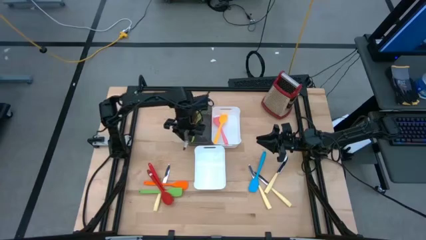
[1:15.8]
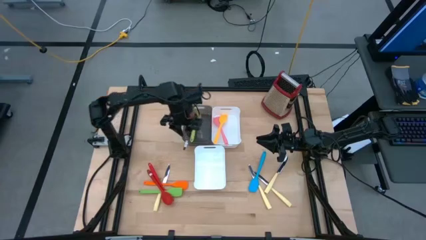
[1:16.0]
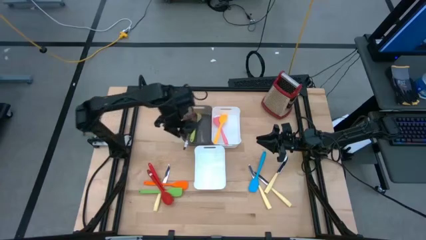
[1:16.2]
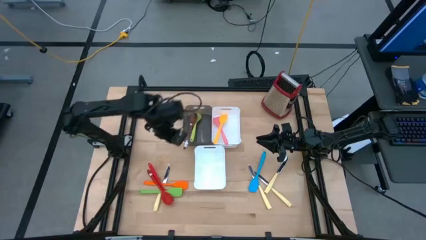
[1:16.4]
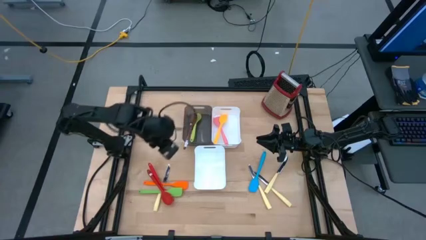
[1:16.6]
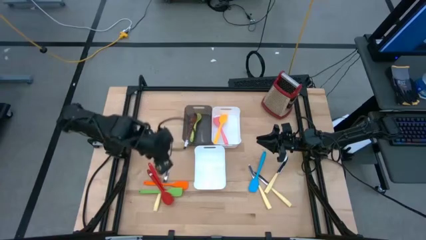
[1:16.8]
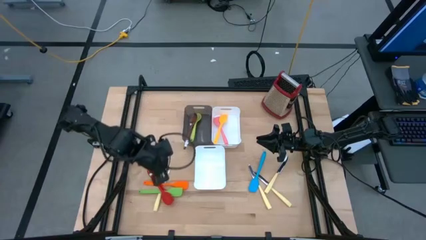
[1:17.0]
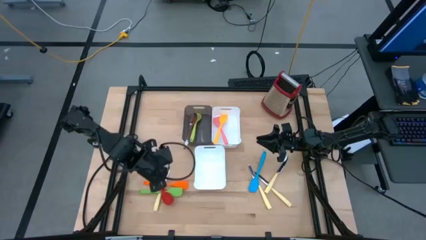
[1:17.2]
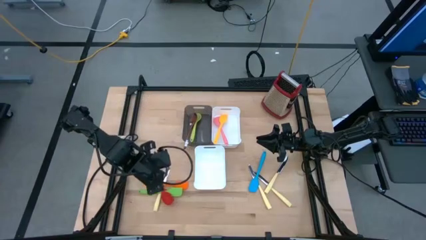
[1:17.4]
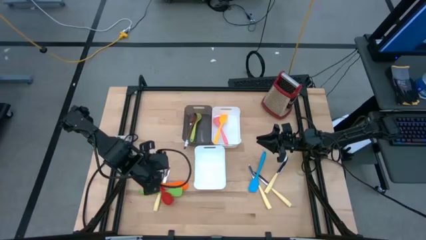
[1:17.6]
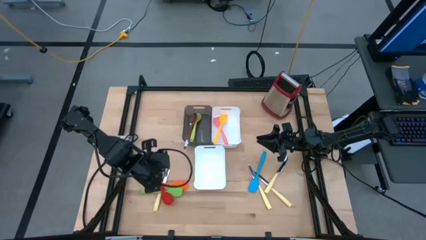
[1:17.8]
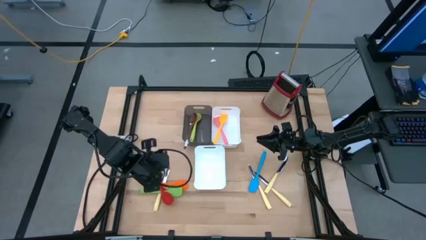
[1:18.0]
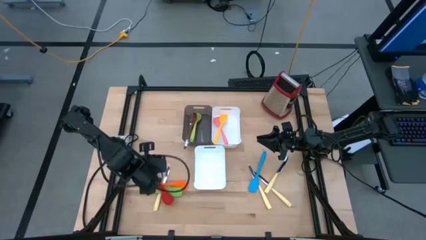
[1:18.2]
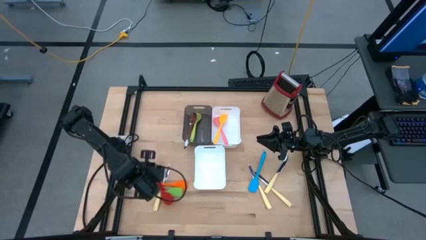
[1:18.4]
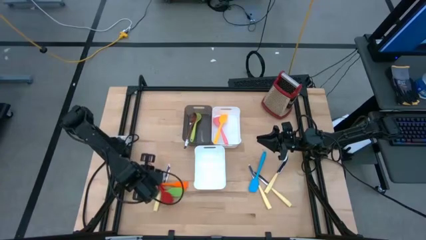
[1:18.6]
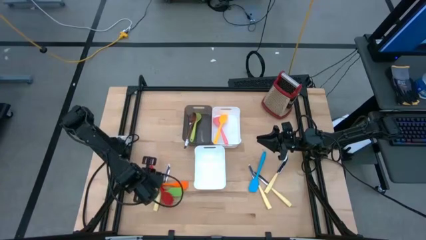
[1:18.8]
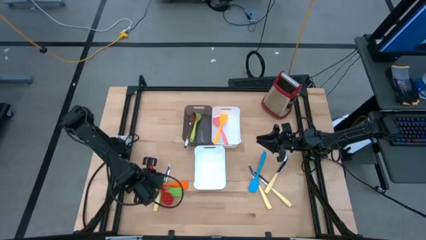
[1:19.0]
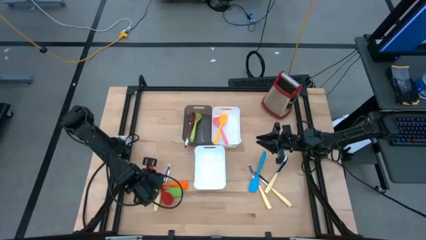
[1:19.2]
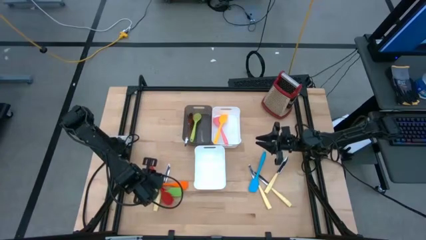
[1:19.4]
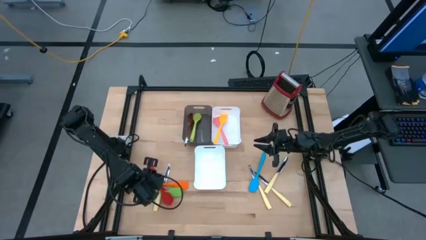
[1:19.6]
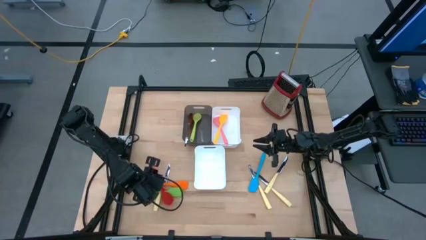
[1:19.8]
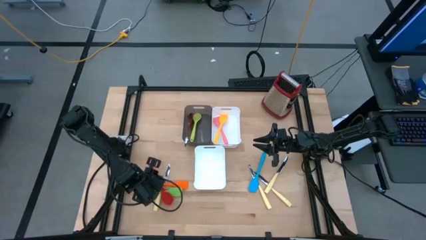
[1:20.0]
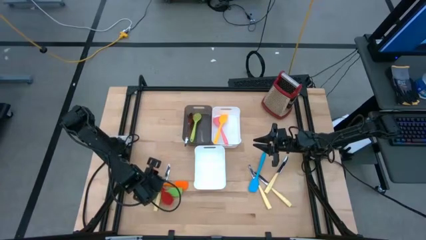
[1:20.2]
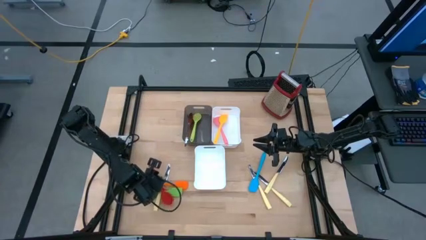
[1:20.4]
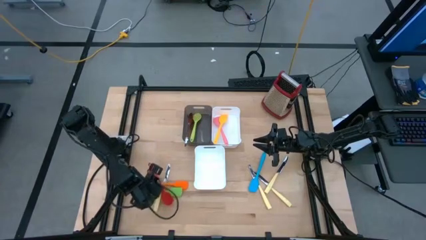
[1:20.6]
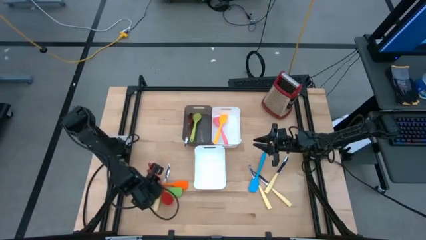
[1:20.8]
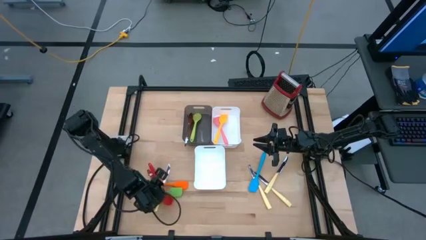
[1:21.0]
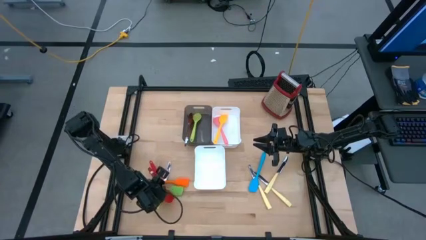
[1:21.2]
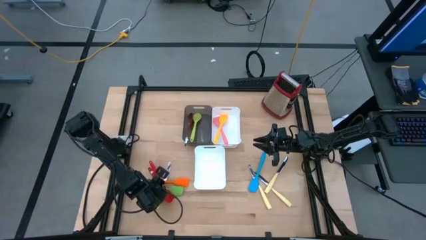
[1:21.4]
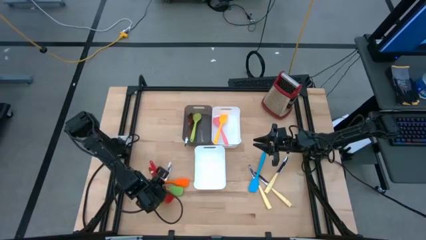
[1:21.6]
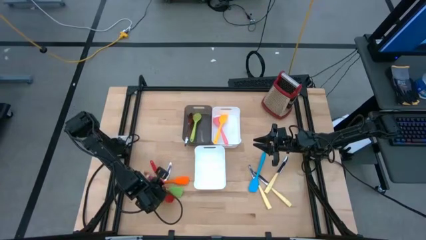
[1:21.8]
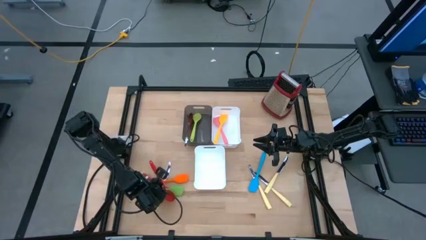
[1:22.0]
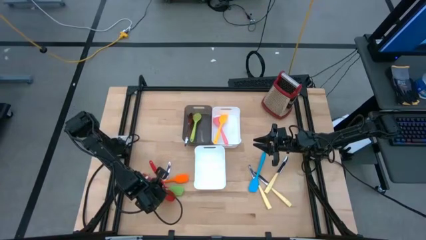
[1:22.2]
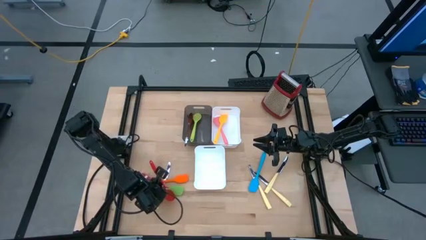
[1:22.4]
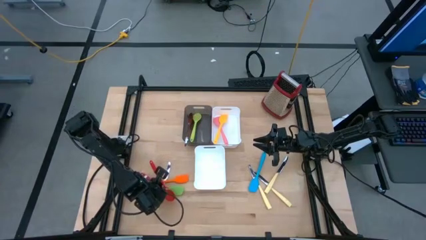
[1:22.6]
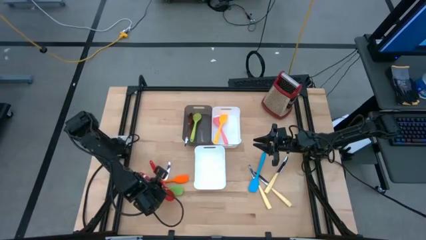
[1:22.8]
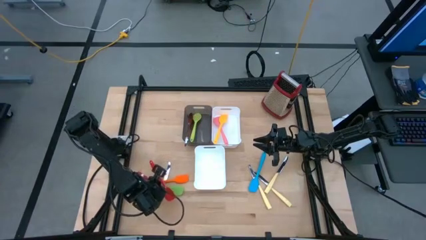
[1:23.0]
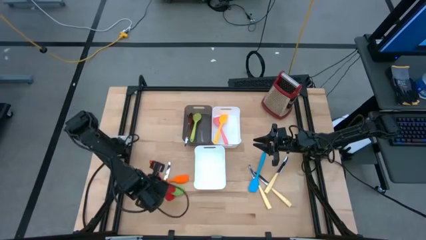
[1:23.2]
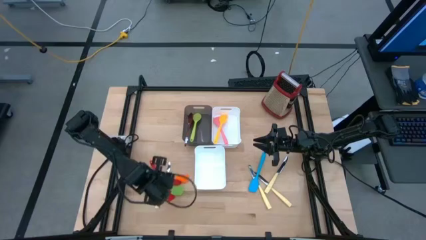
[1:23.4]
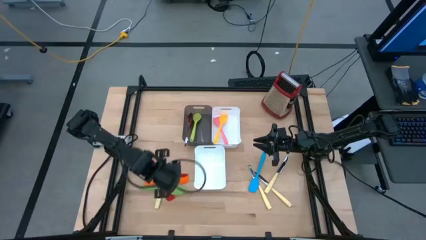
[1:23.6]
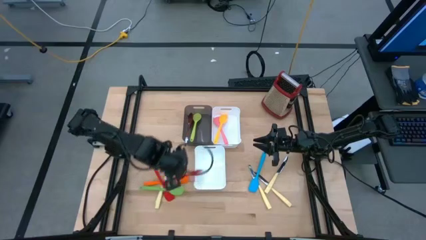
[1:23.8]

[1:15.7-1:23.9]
Task: Pick & Place Kitchen Items
Put the red serving spoon into the black bin

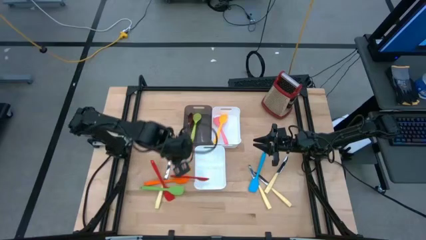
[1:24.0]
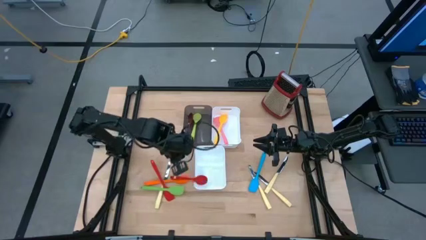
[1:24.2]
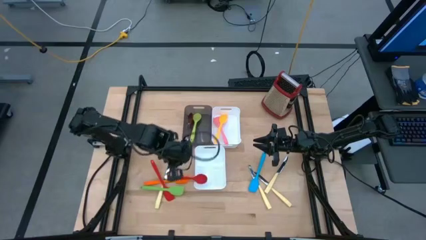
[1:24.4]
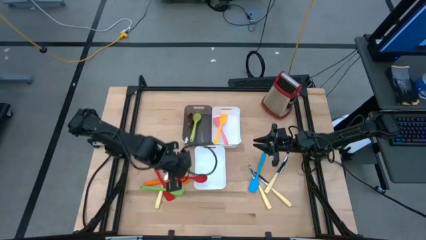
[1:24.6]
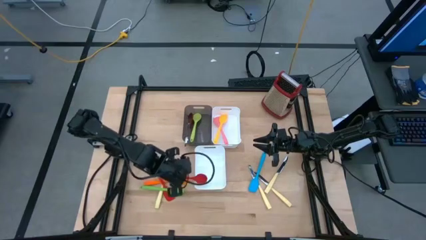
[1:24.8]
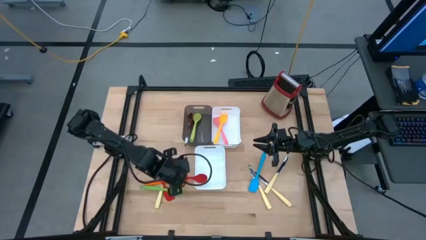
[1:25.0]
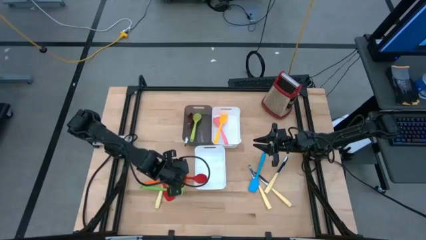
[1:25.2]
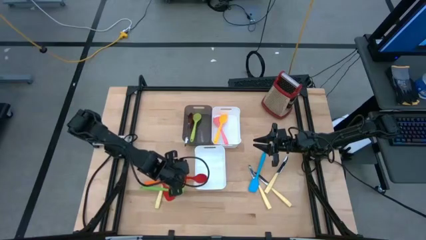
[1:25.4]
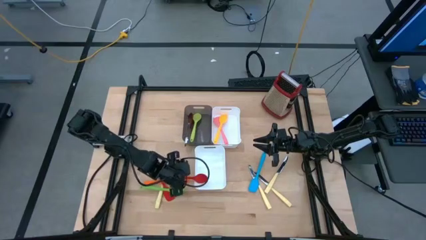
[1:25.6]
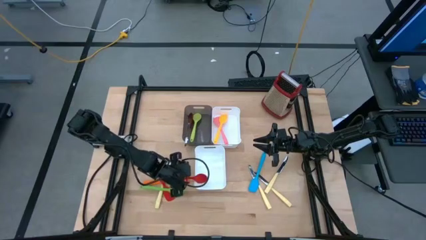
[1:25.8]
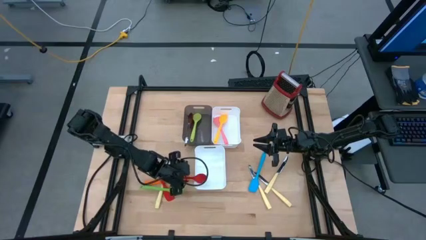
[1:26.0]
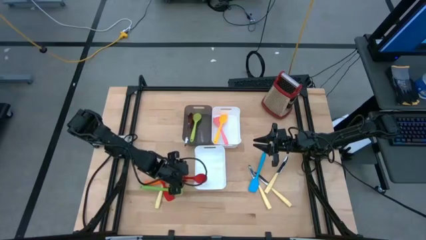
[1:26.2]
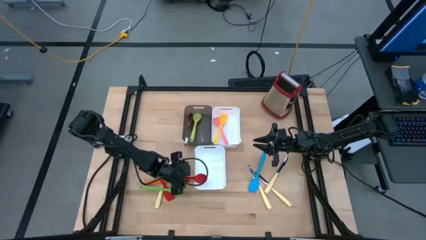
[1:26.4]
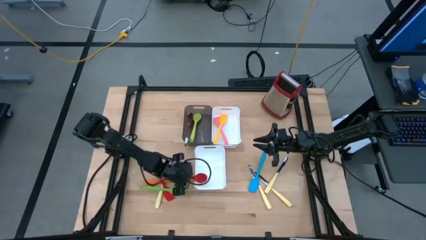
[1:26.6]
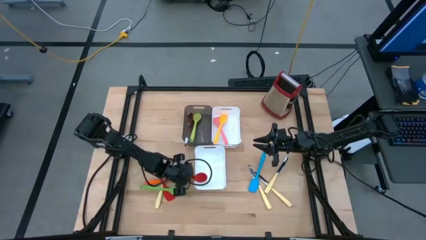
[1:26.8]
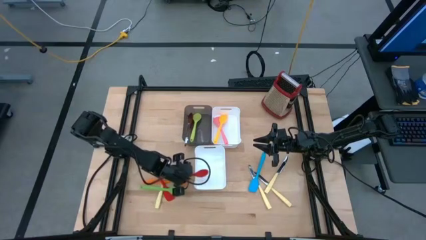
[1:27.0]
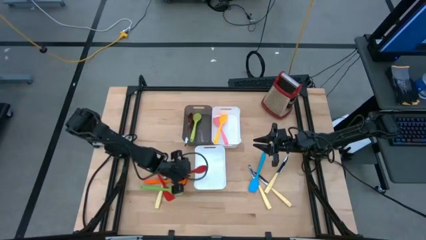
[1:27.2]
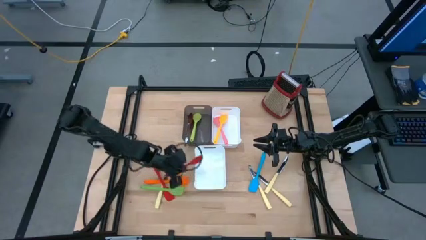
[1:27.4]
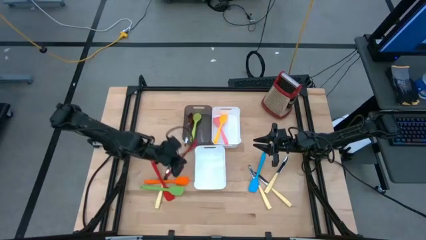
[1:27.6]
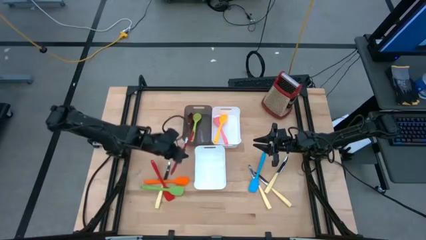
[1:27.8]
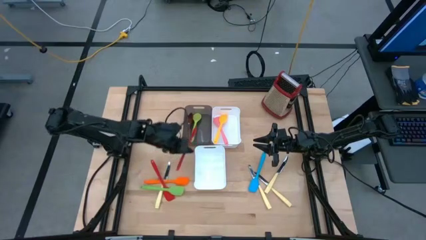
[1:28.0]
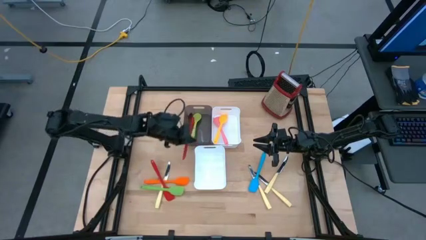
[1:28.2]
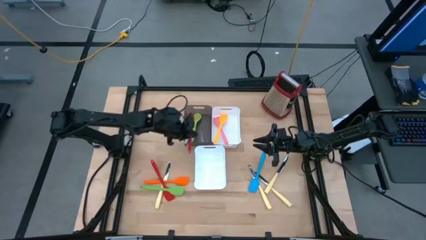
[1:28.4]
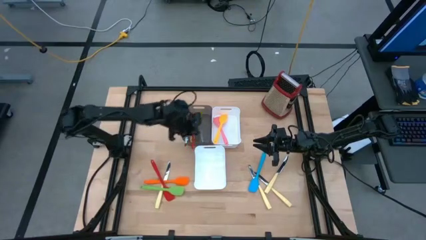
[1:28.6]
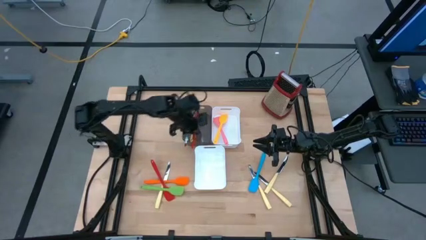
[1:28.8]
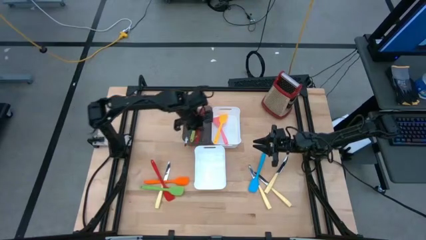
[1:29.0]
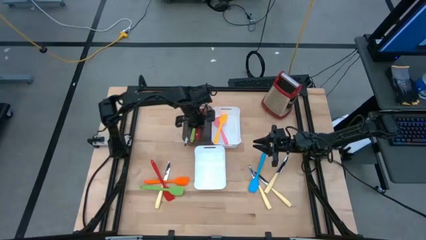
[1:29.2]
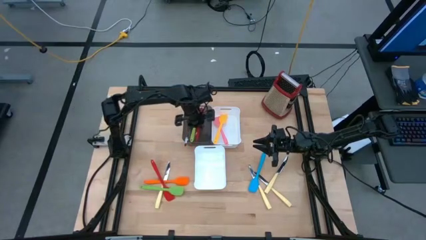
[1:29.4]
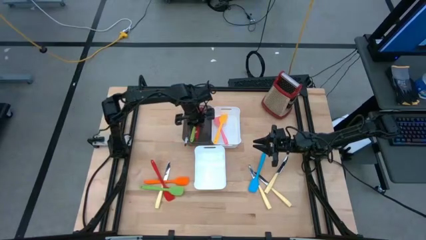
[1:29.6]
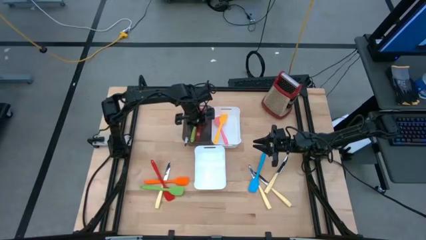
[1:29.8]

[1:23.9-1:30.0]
Put the red serving spoon into the black bin
